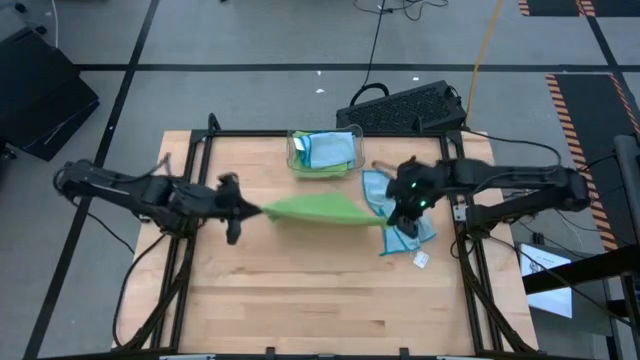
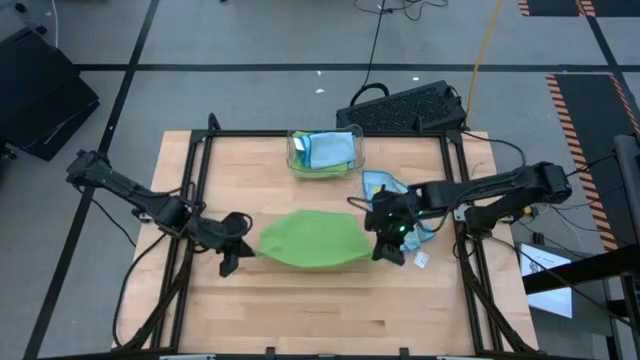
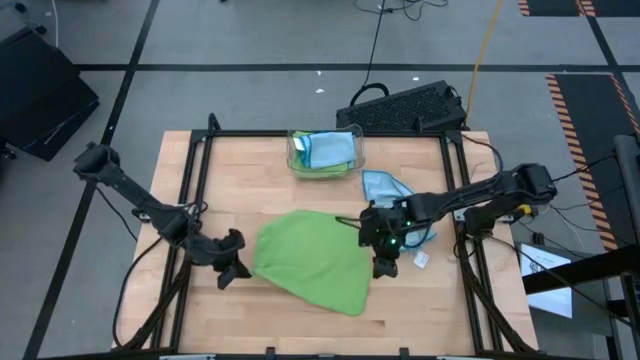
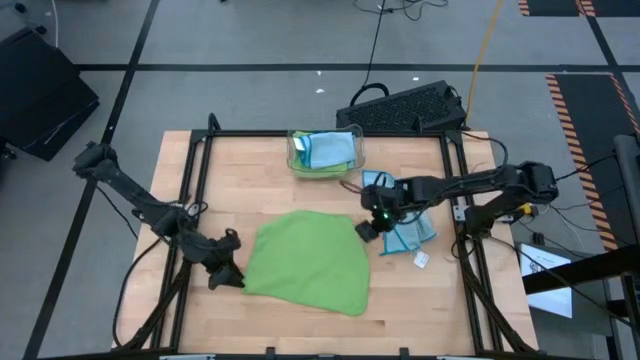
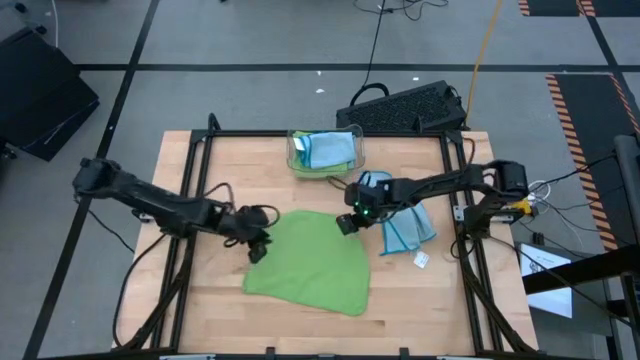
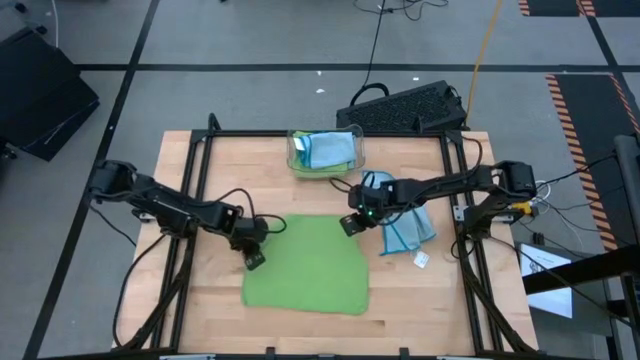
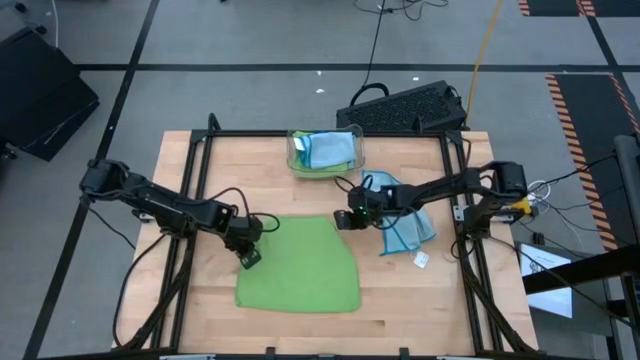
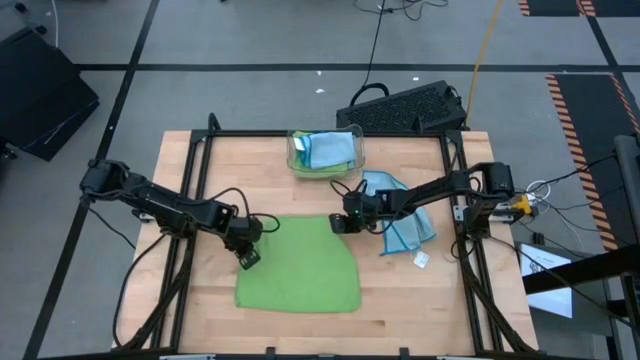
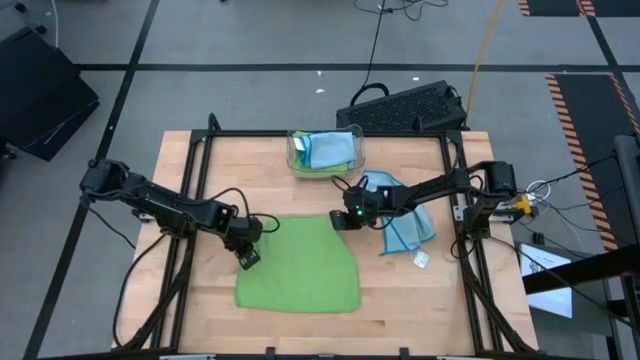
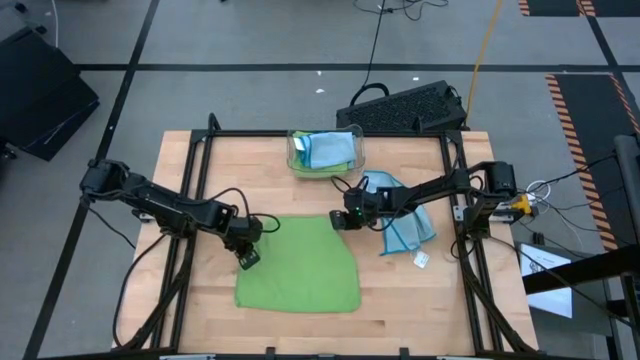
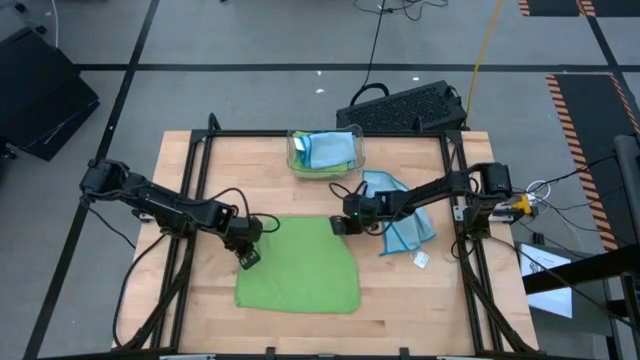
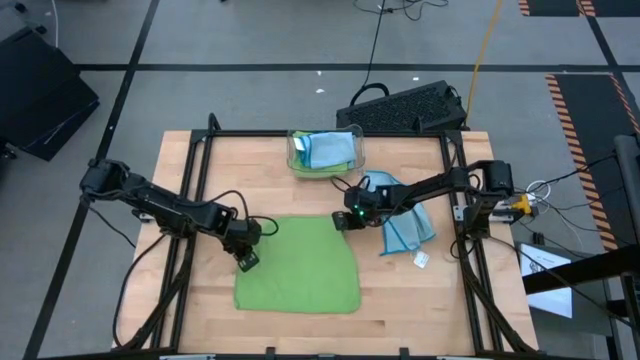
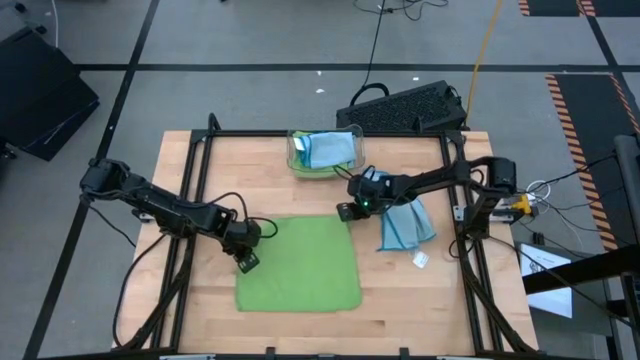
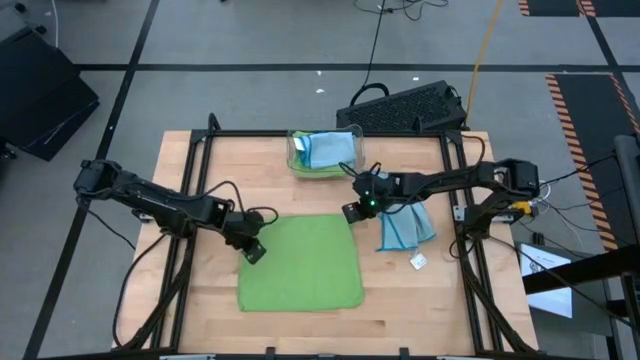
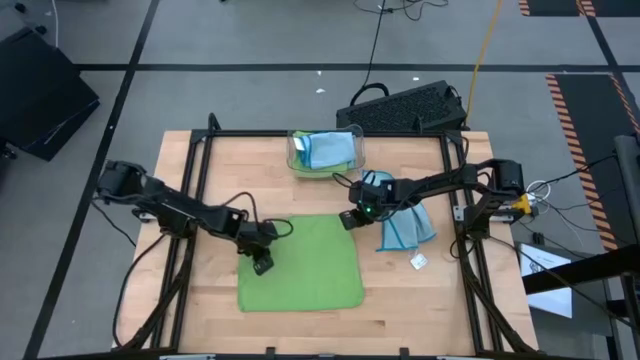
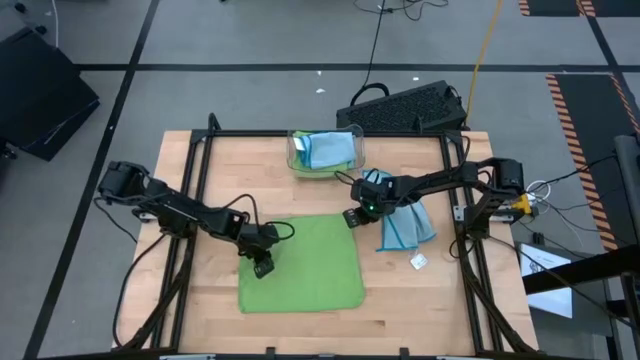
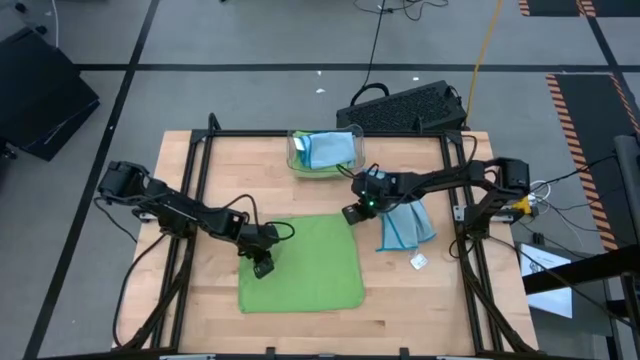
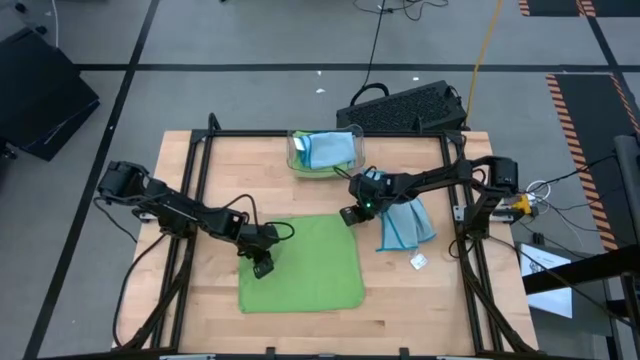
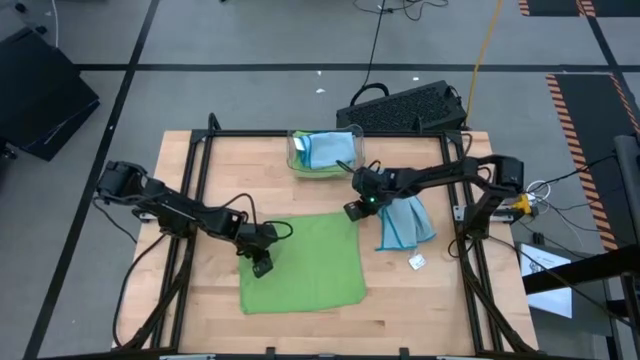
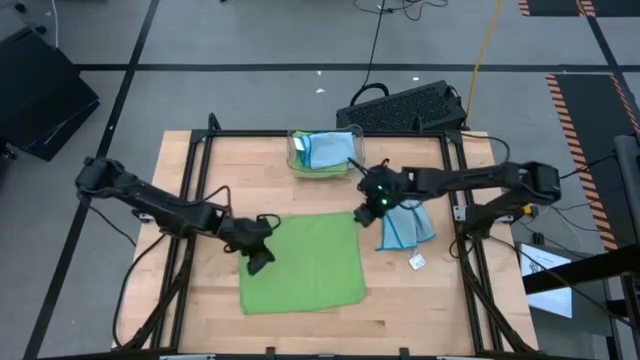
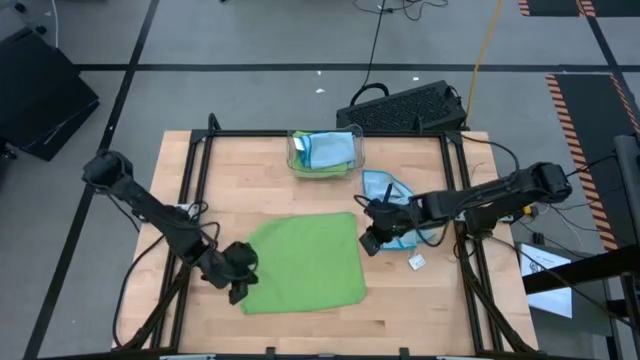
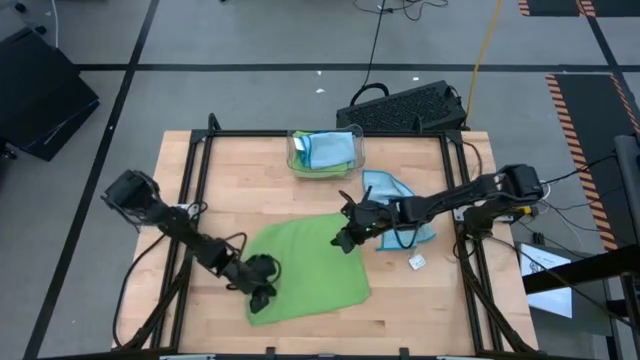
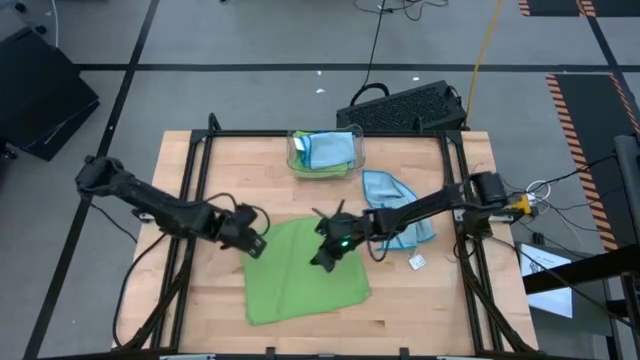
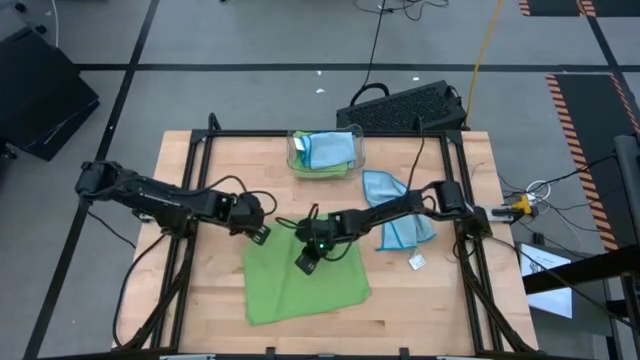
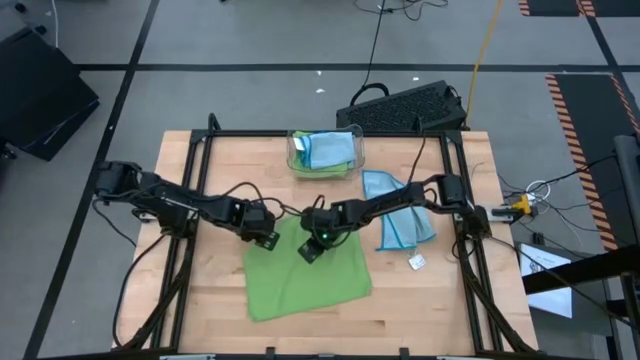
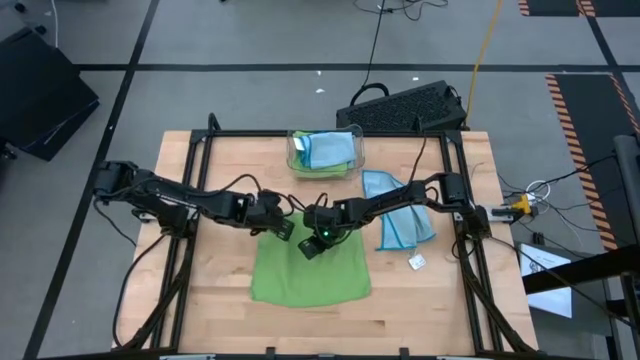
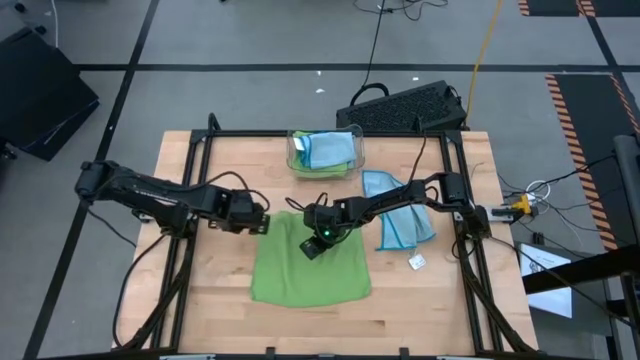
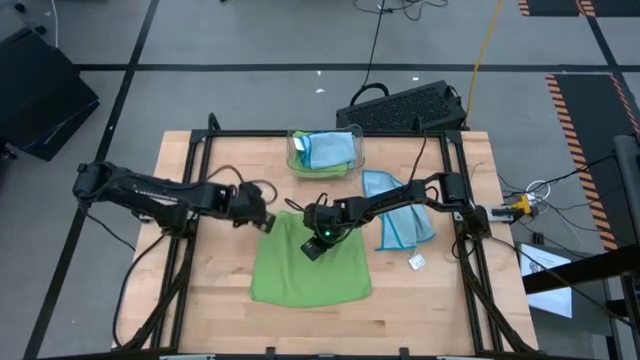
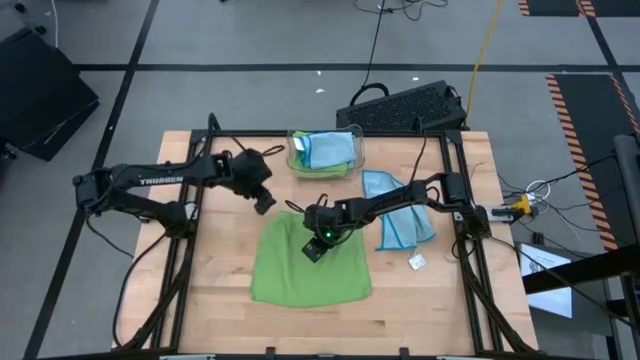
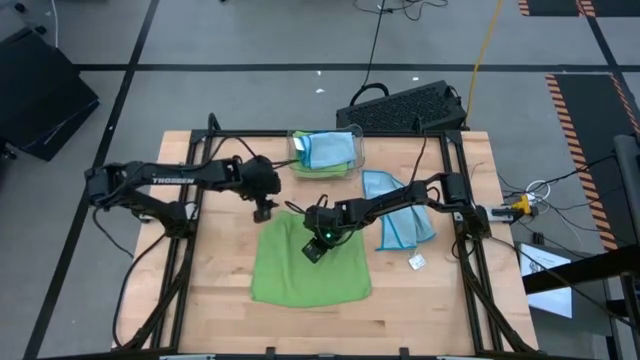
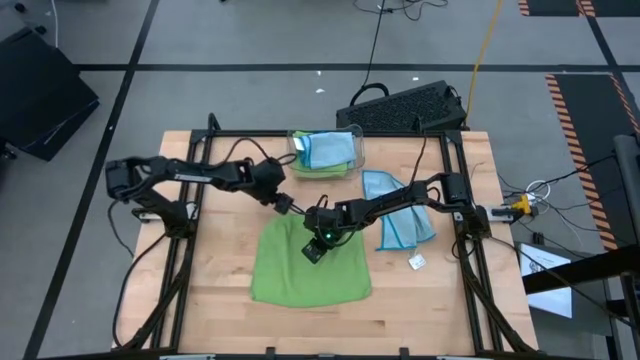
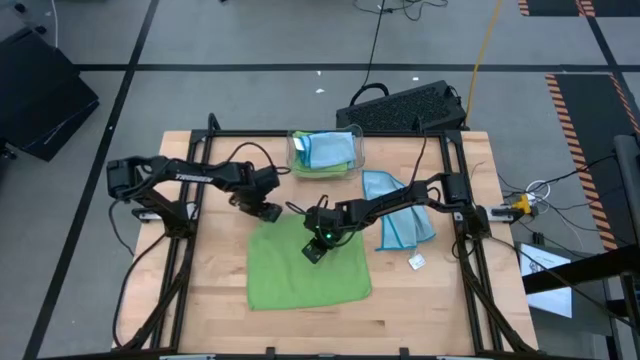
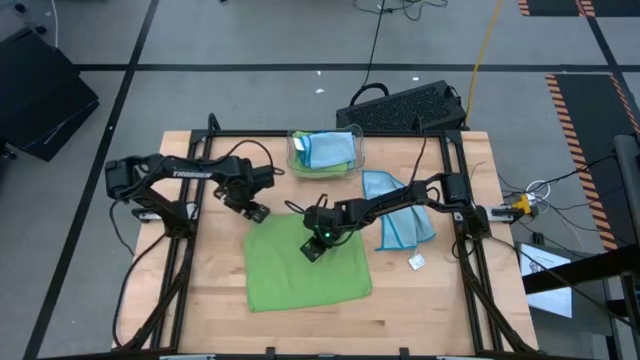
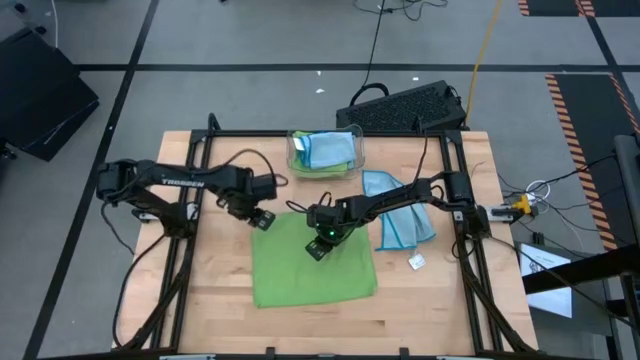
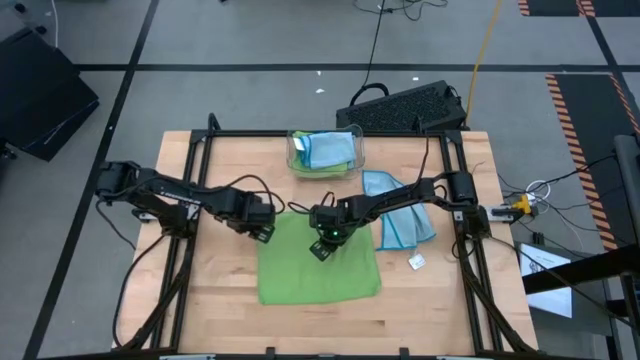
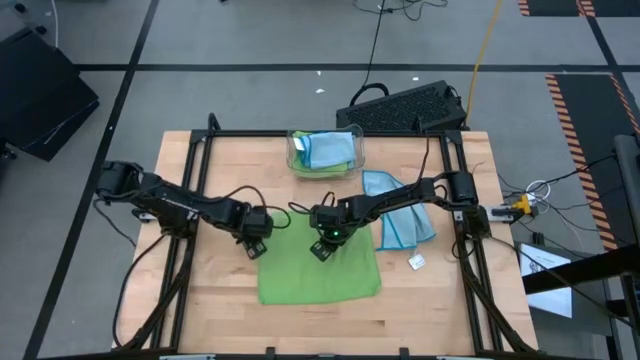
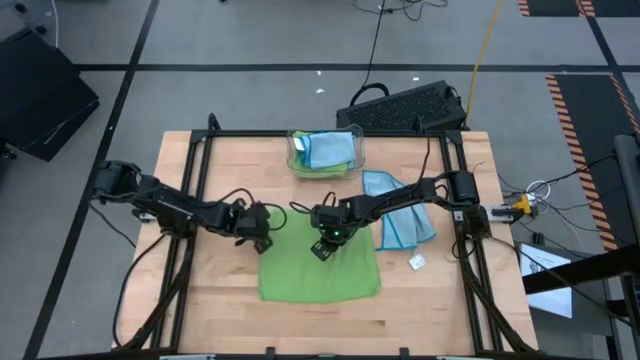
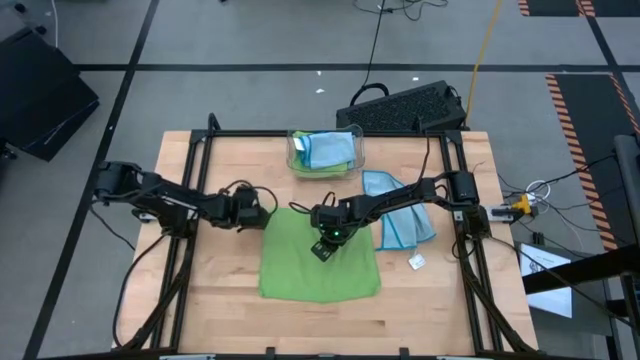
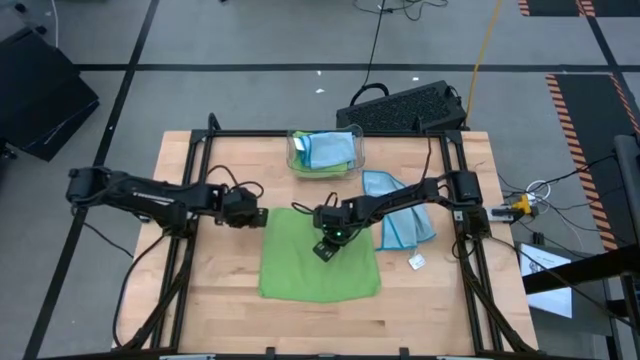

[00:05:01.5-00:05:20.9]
Task: Fold microfiber towels
Fold the green microfiber cloth

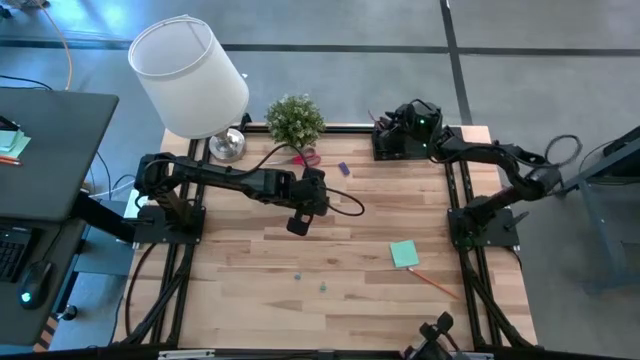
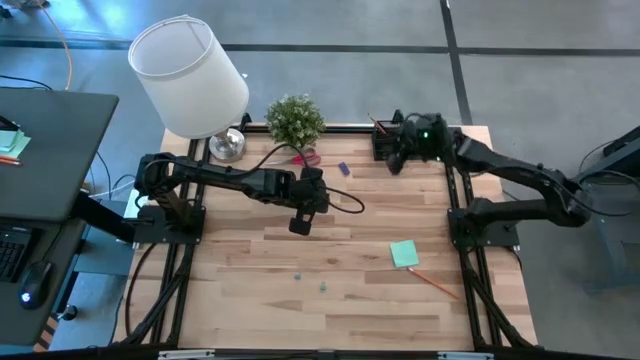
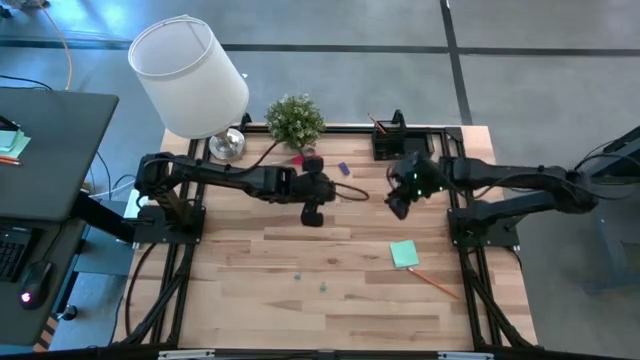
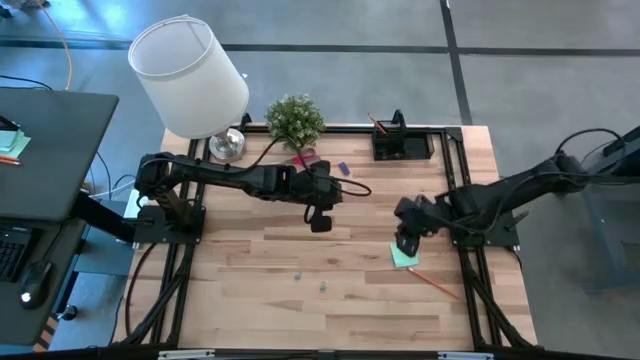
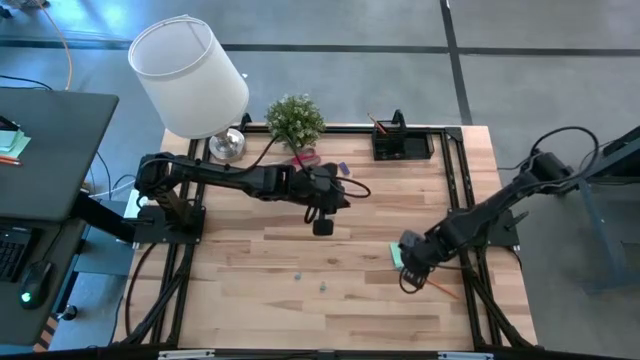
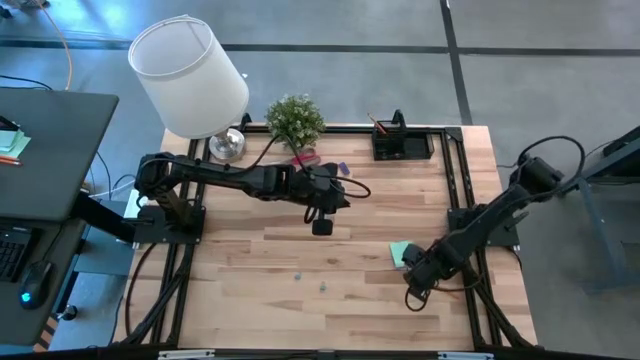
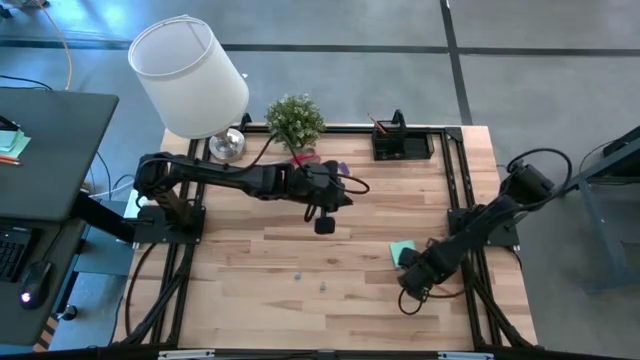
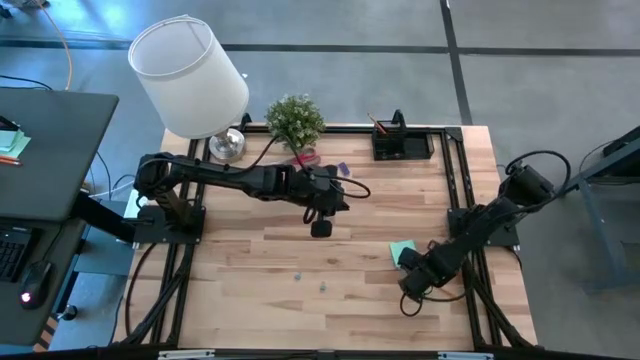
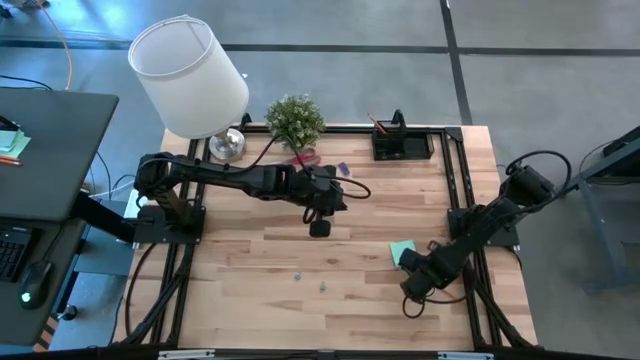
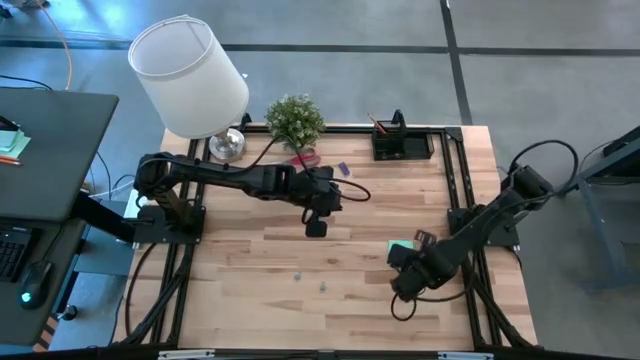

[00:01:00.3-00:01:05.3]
Task: Pick and place office supplies into organizer
Put the orange pencil in the black desk organizer
